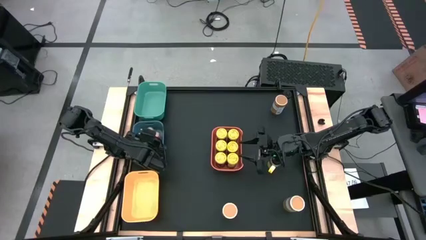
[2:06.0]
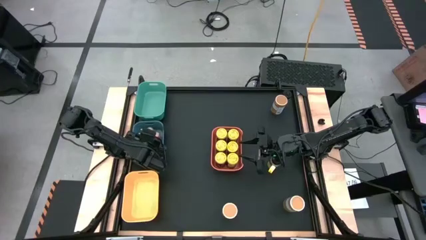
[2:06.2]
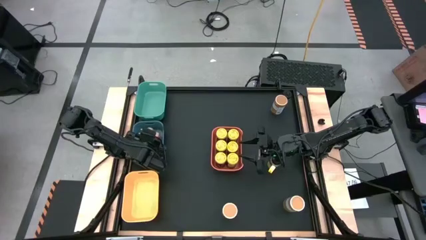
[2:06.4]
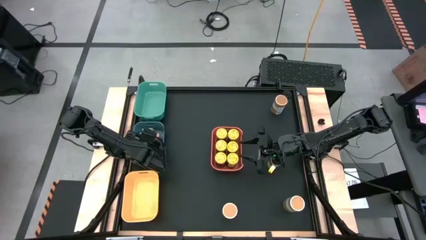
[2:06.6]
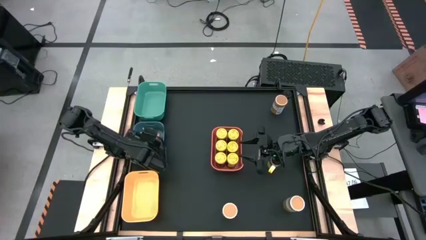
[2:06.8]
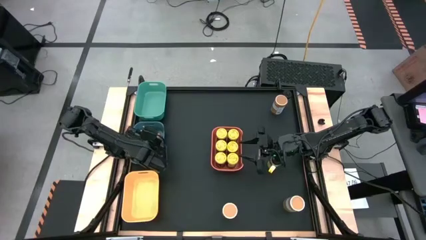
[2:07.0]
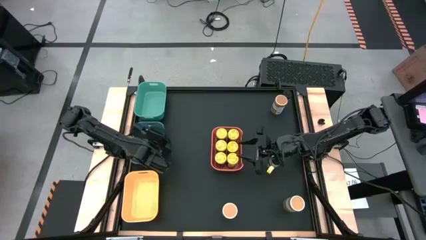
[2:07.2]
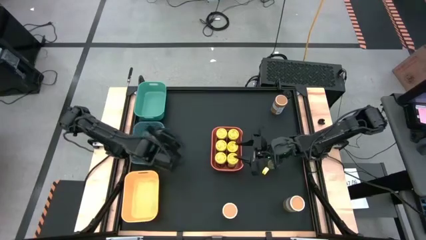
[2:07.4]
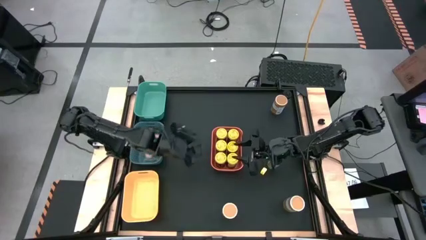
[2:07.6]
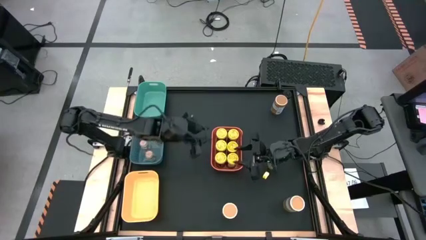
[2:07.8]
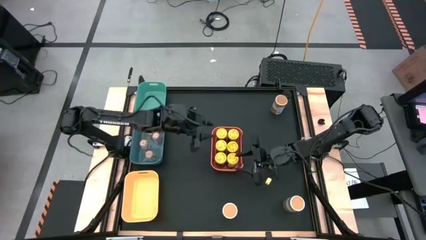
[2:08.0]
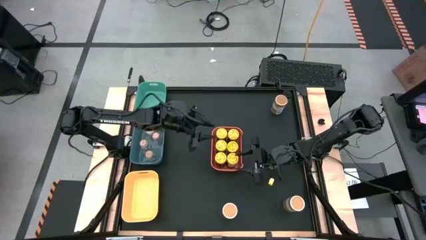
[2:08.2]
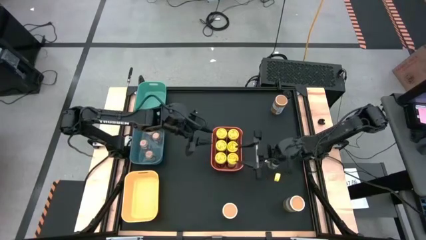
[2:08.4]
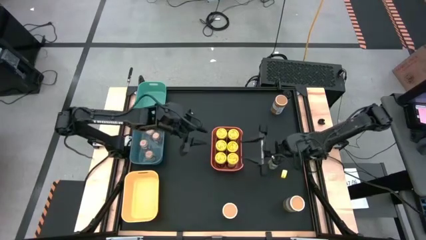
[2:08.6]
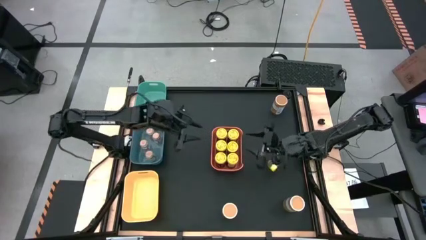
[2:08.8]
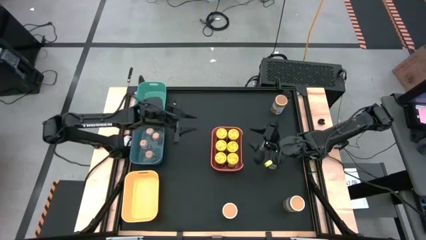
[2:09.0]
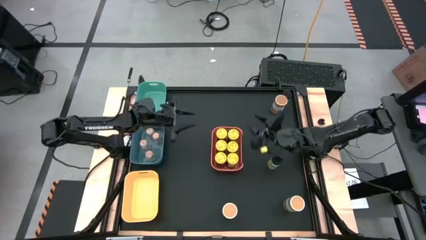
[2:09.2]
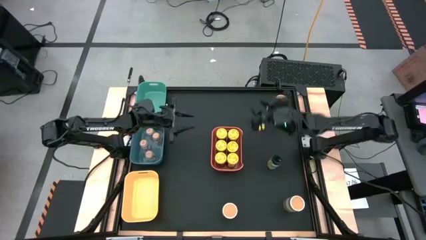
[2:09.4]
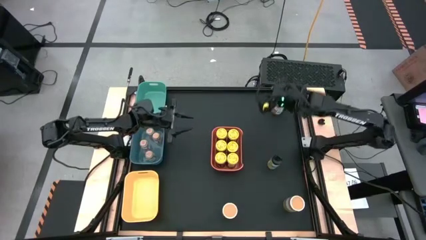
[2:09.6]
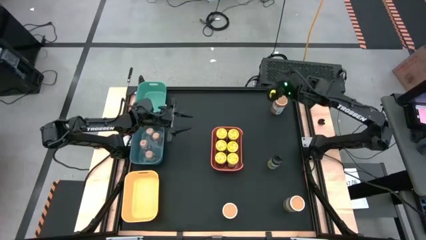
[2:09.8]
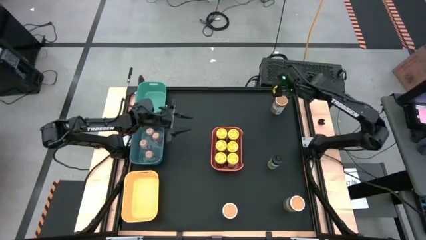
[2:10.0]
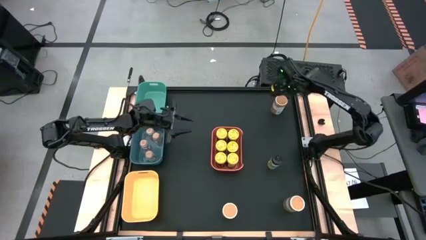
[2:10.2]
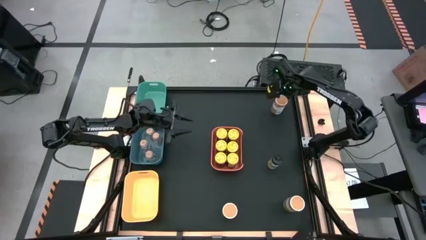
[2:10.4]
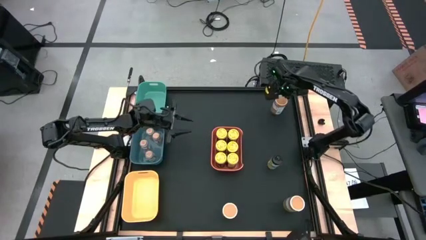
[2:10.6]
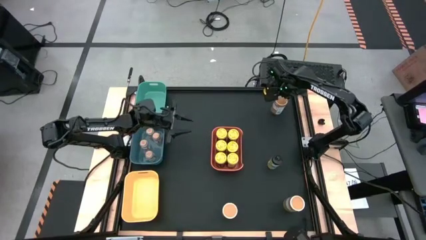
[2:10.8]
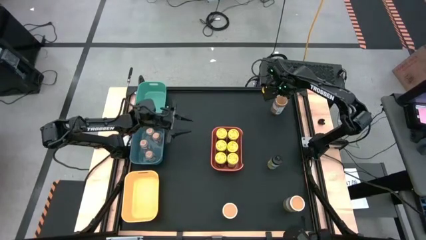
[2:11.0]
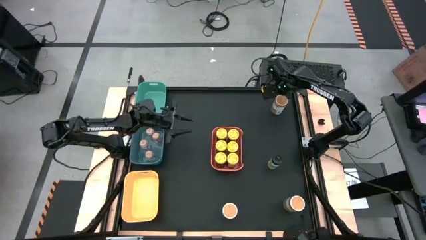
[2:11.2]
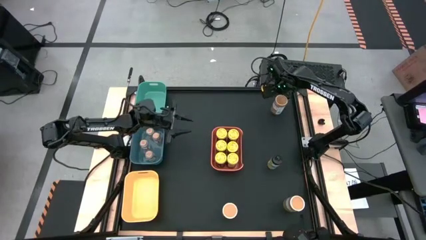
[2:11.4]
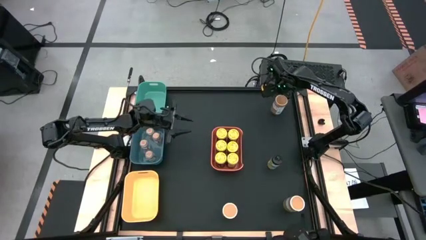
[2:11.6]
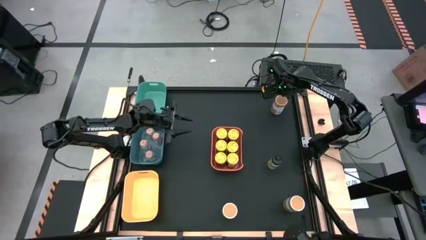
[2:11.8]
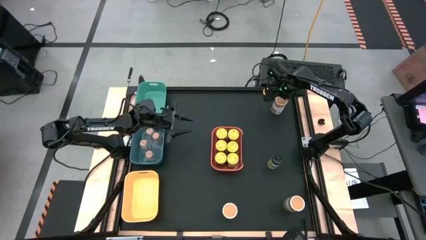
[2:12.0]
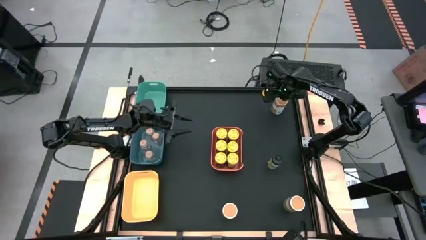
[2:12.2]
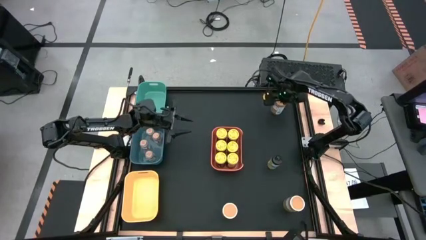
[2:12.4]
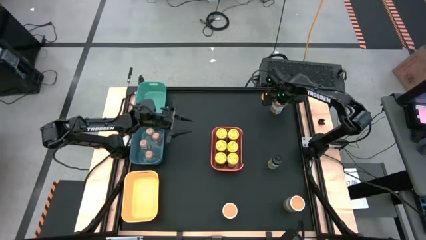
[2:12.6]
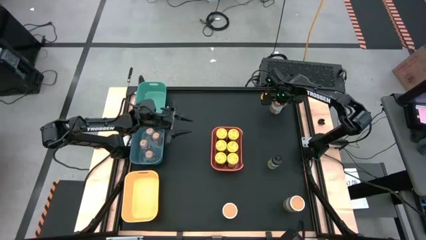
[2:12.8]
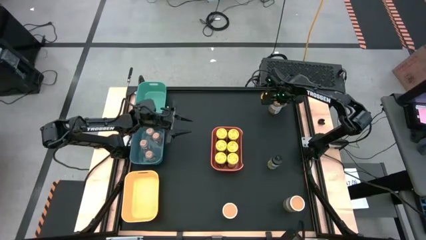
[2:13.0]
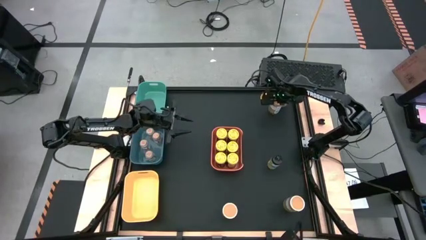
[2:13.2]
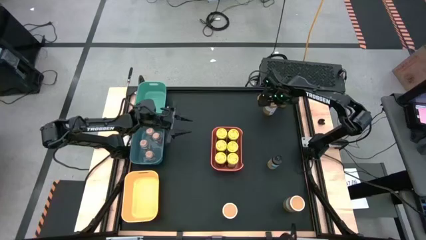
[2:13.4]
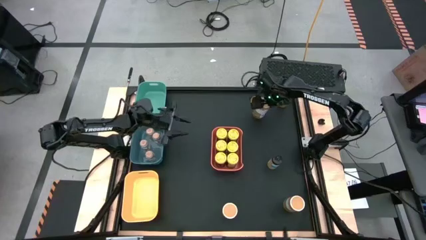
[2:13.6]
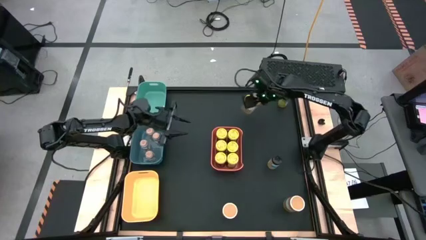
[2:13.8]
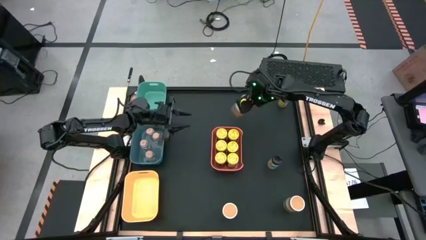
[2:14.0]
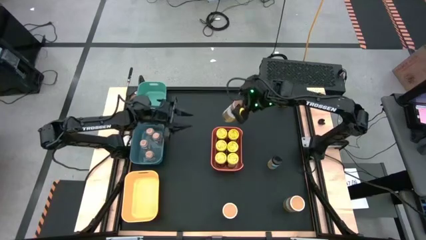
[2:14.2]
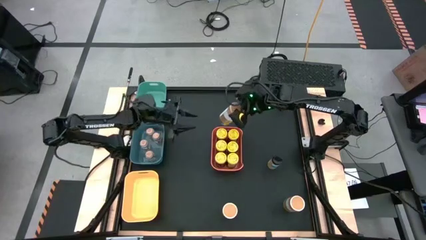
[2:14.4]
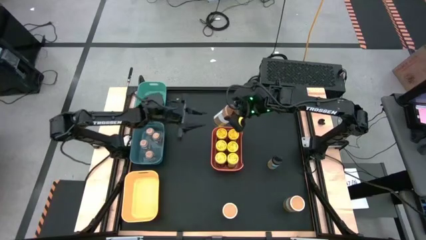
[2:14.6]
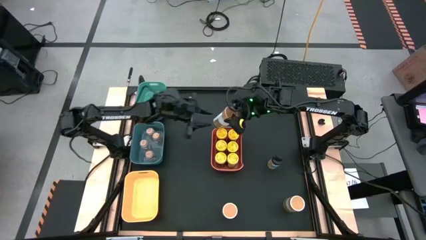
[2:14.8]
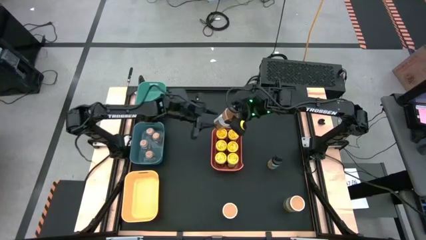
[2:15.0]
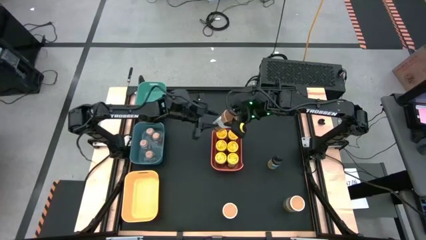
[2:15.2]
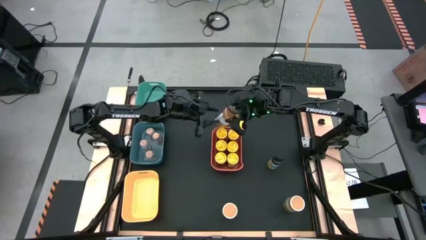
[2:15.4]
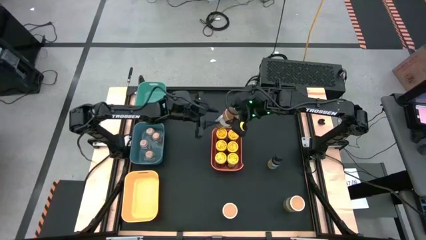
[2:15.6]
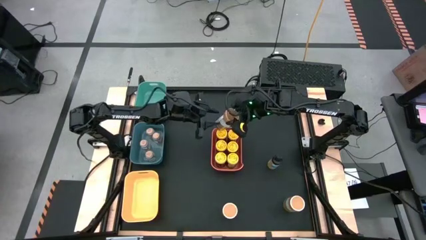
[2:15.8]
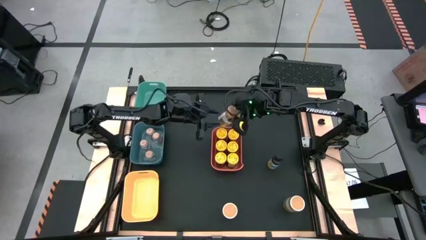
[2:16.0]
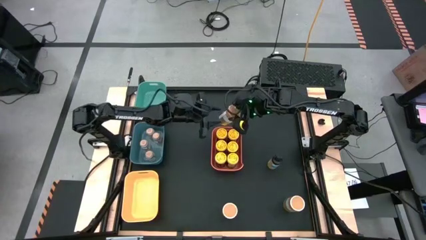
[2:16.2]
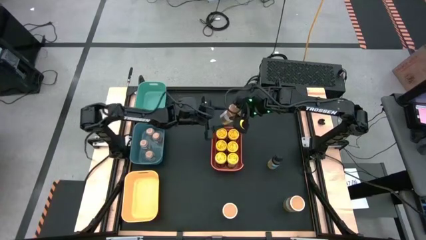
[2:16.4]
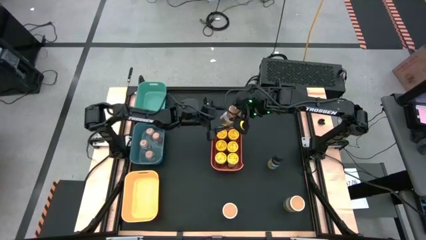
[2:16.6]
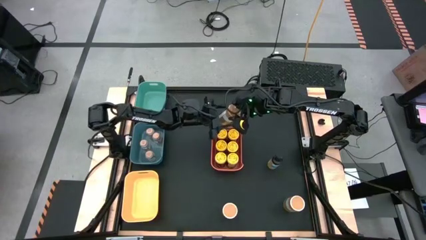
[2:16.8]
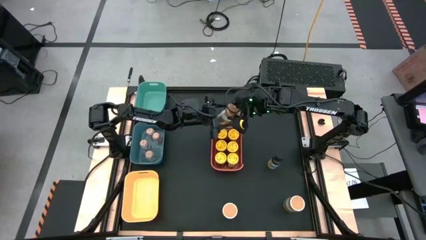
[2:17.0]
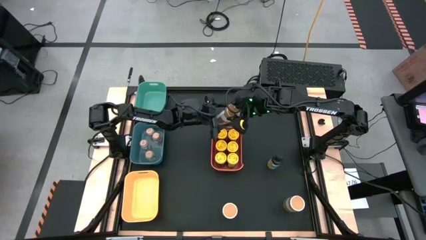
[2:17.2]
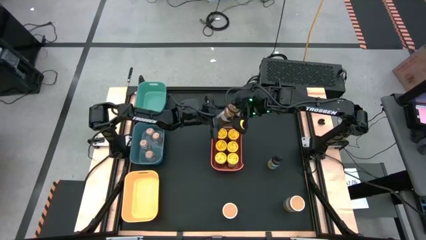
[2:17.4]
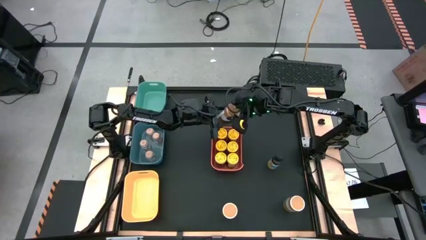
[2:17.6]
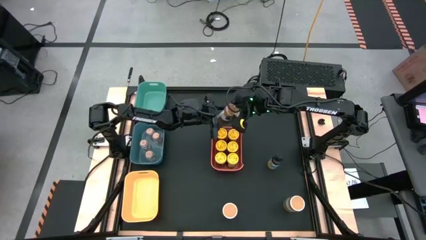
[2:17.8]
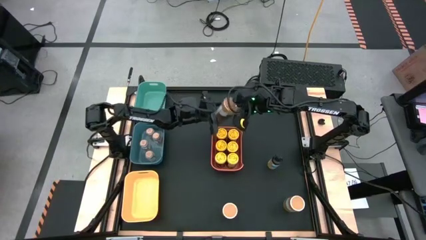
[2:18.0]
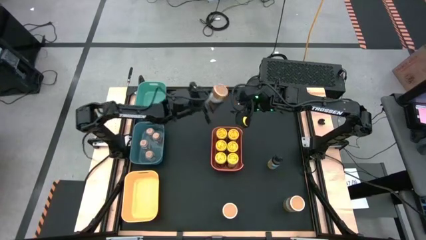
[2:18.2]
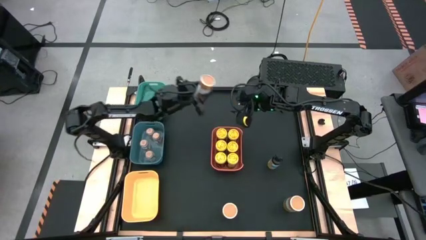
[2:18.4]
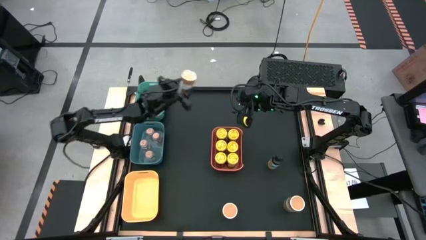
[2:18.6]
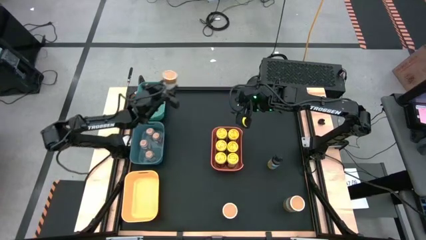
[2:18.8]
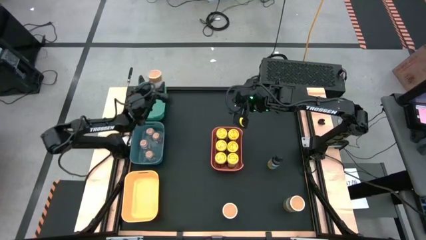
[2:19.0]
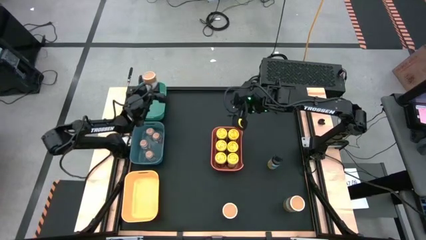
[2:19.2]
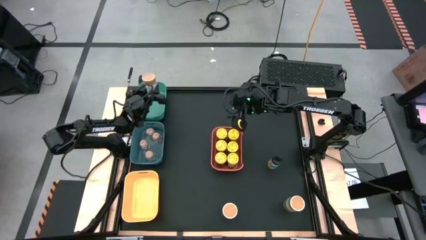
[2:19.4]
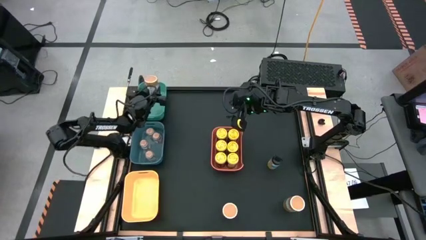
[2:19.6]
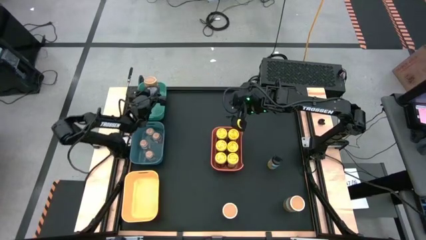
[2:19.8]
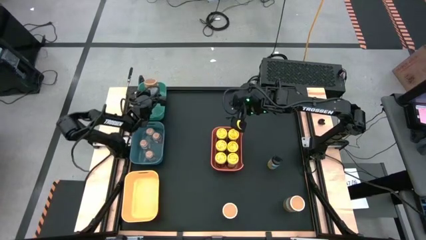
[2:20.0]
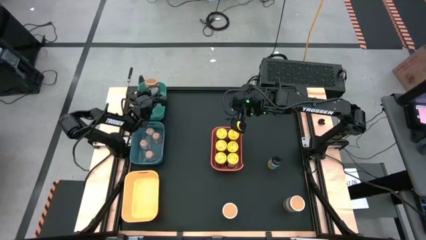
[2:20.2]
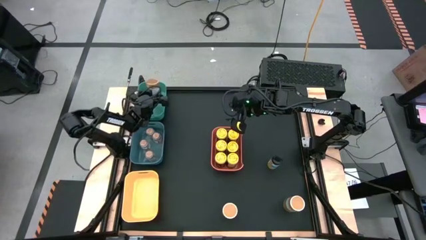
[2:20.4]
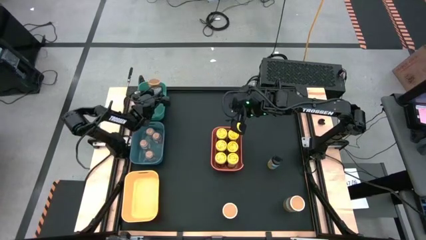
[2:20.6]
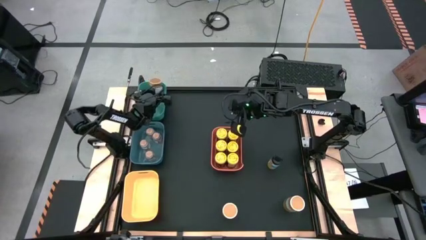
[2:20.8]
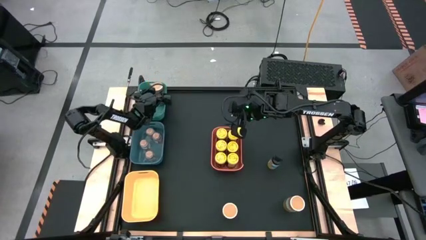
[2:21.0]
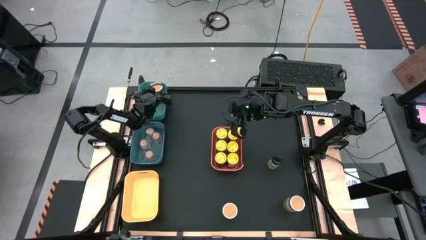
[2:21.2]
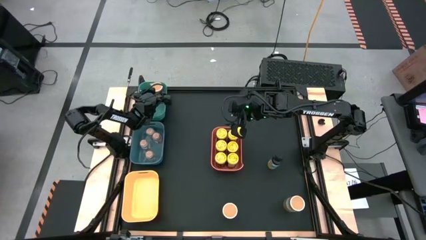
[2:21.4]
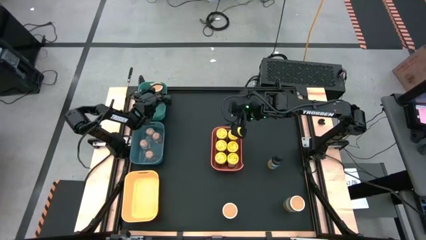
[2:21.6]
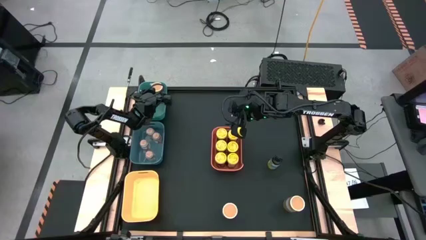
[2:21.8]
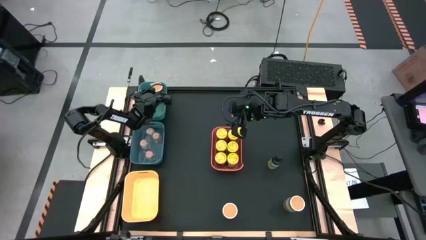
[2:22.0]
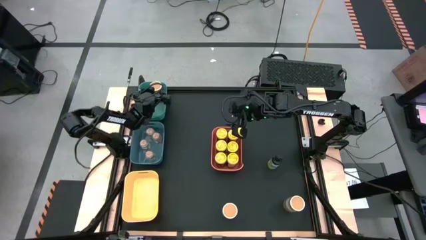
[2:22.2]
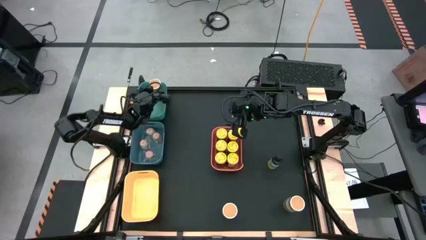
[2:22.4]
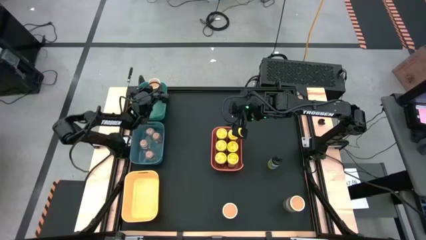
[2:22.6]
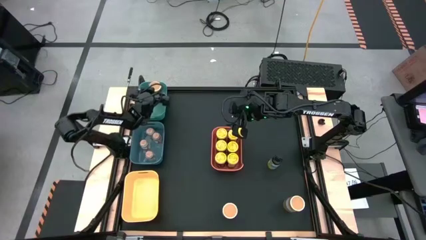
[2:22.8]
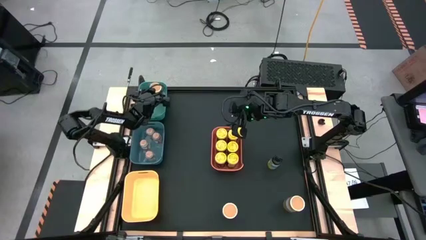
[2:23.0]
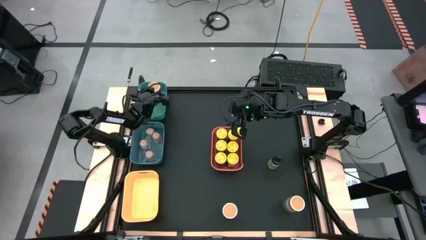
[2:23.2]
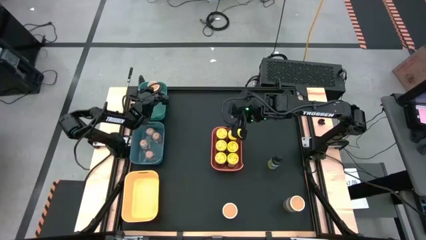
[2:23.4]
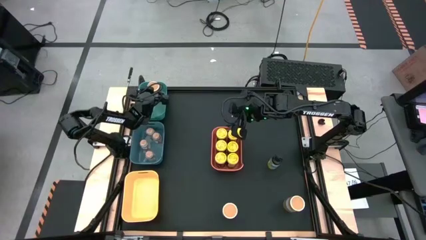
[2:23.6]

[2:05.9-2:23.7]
Task: Sort spices by type
Put the golden seasoning bottle in the green bin
